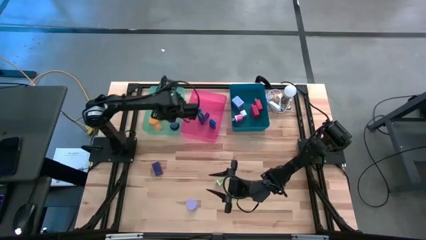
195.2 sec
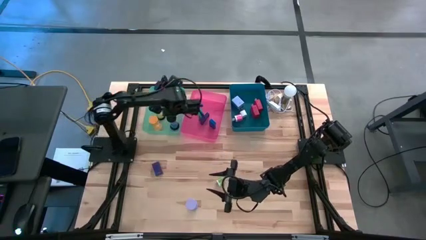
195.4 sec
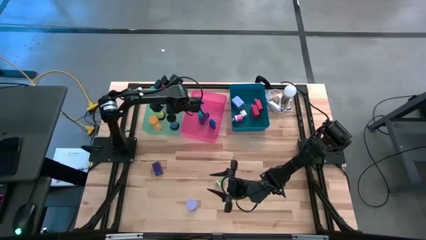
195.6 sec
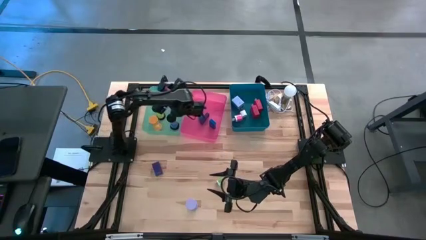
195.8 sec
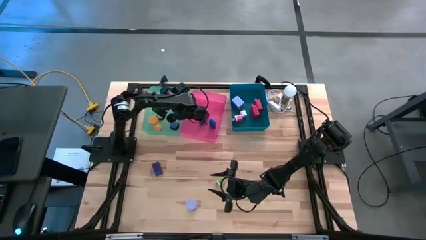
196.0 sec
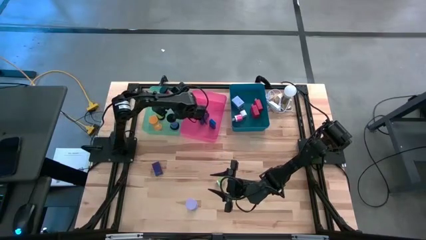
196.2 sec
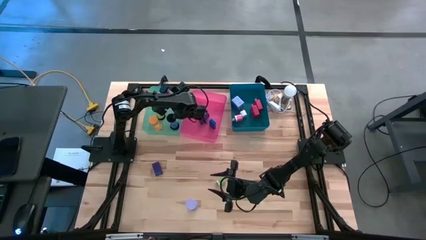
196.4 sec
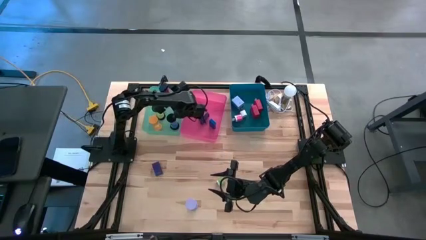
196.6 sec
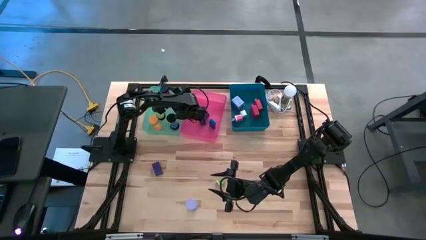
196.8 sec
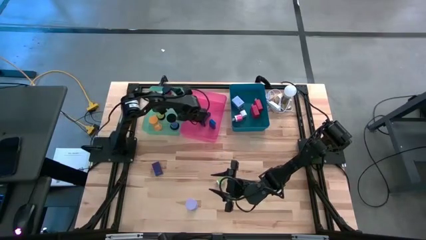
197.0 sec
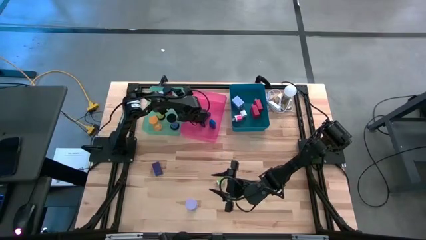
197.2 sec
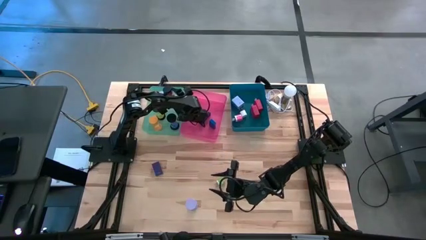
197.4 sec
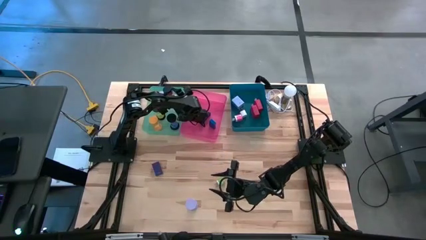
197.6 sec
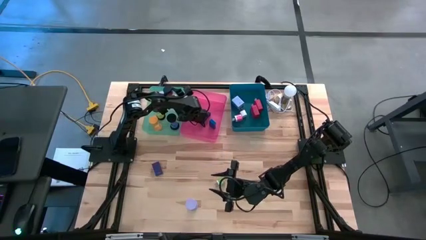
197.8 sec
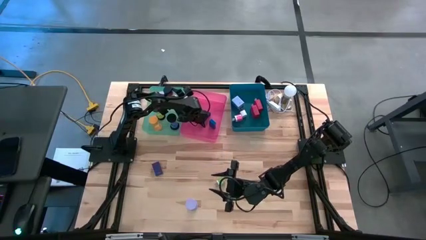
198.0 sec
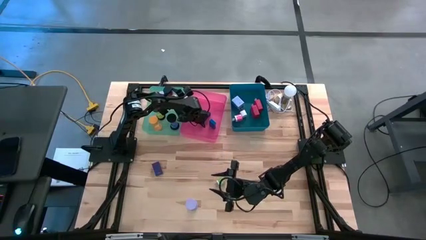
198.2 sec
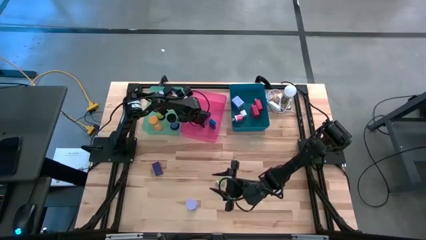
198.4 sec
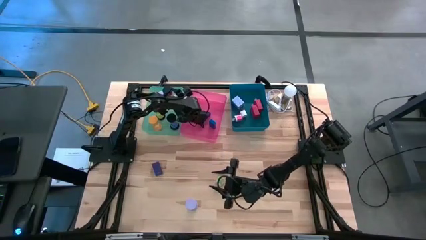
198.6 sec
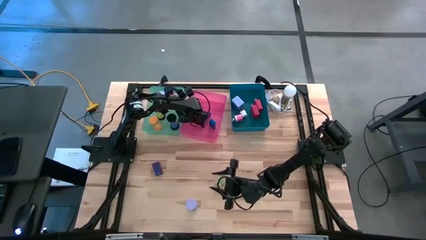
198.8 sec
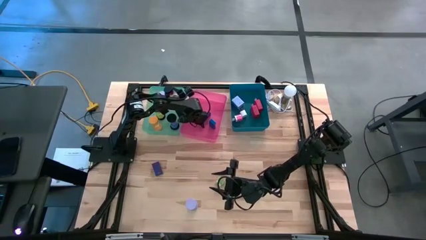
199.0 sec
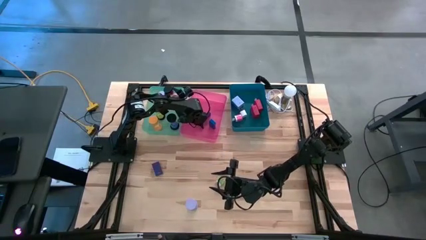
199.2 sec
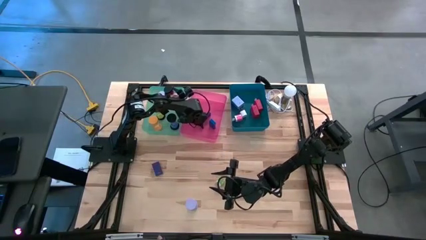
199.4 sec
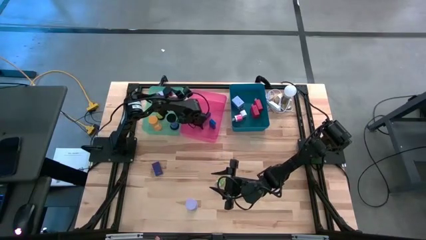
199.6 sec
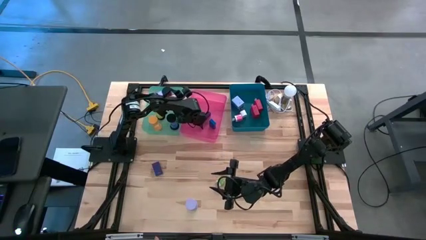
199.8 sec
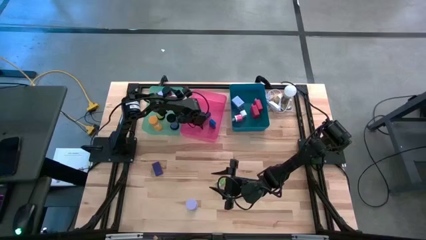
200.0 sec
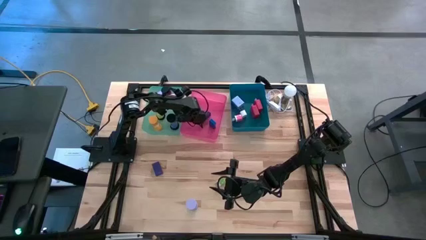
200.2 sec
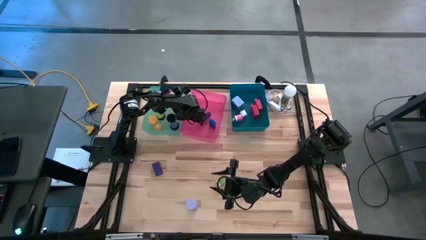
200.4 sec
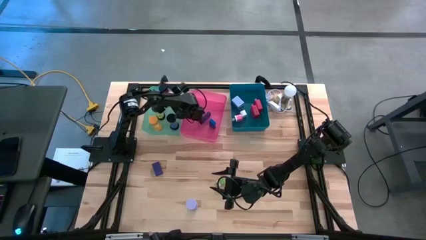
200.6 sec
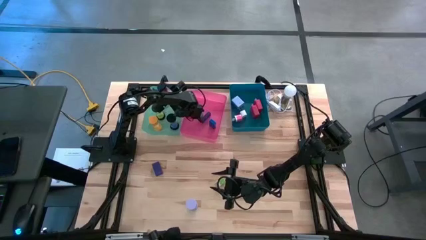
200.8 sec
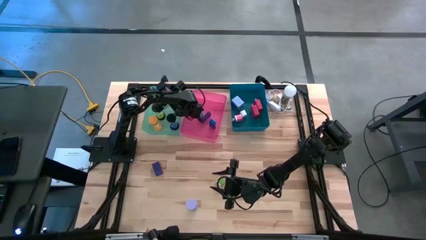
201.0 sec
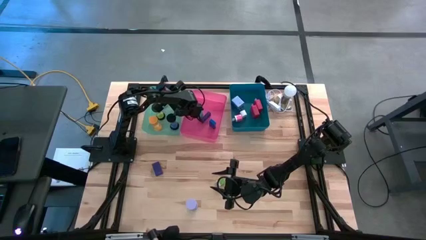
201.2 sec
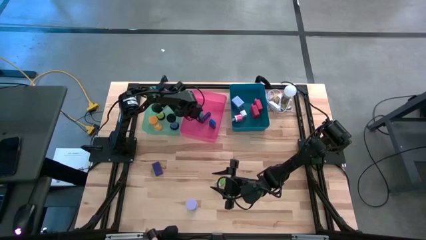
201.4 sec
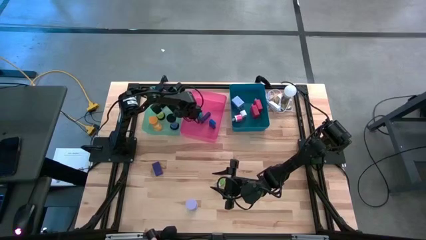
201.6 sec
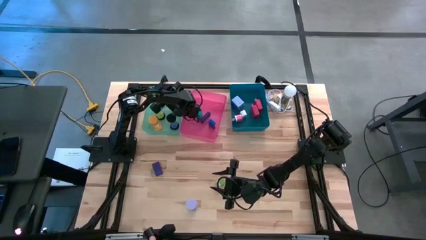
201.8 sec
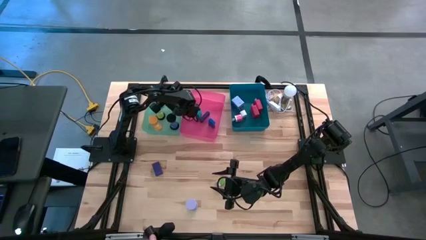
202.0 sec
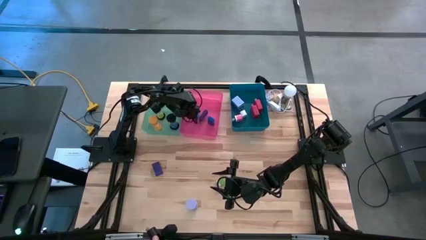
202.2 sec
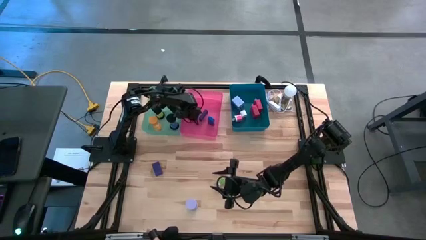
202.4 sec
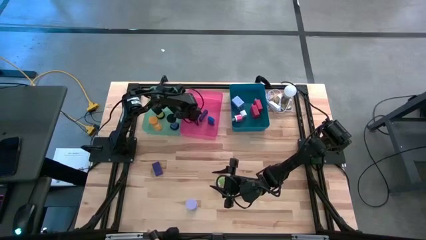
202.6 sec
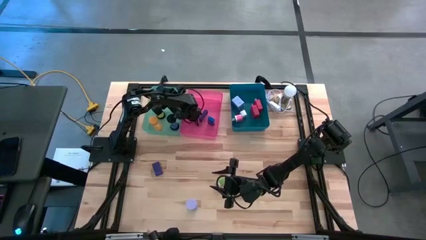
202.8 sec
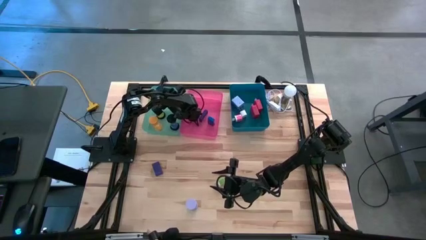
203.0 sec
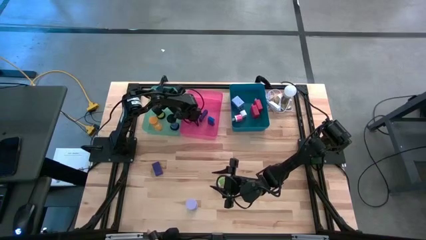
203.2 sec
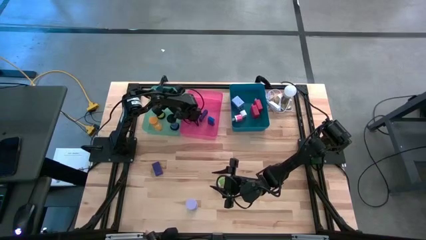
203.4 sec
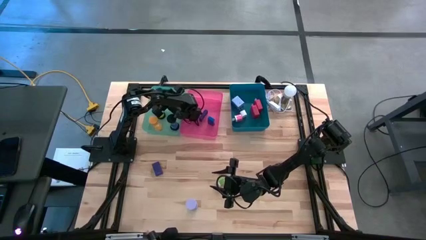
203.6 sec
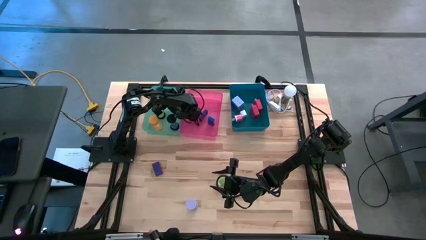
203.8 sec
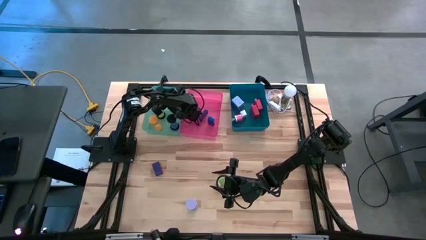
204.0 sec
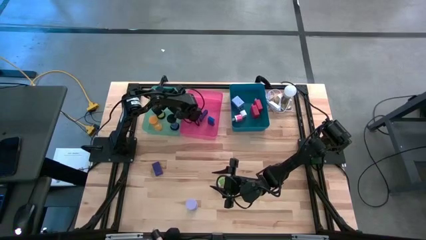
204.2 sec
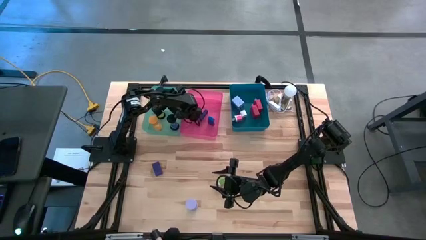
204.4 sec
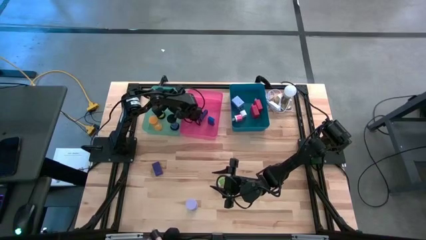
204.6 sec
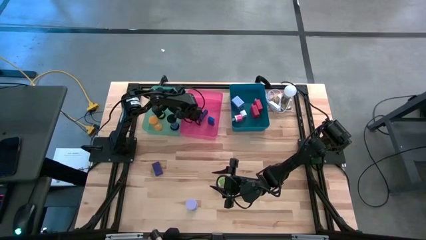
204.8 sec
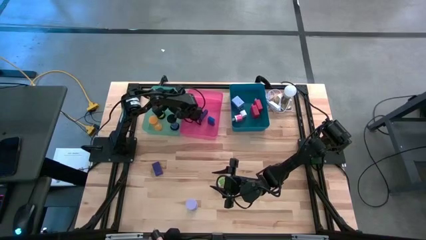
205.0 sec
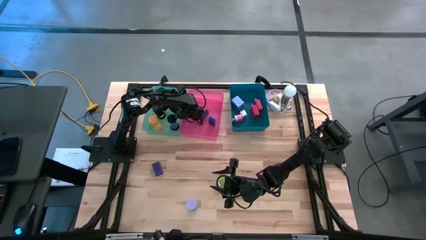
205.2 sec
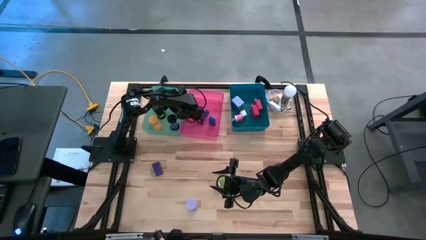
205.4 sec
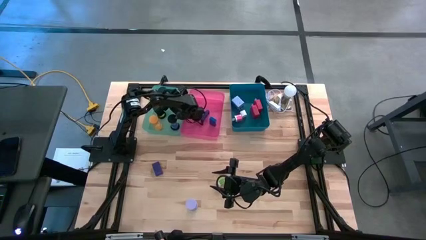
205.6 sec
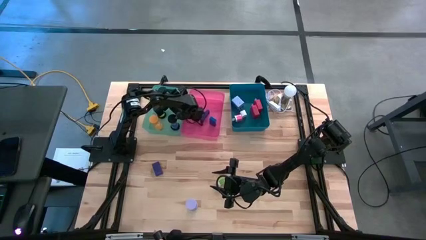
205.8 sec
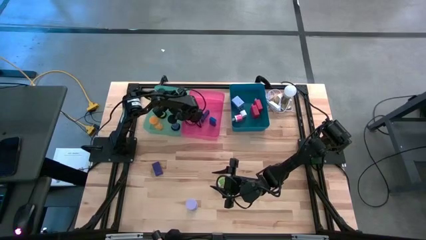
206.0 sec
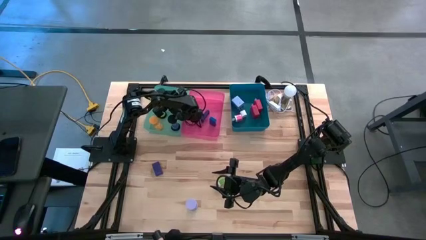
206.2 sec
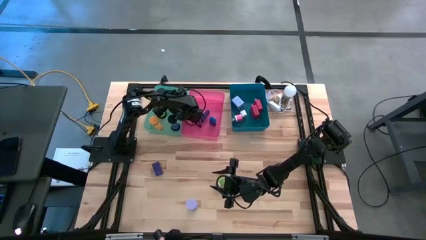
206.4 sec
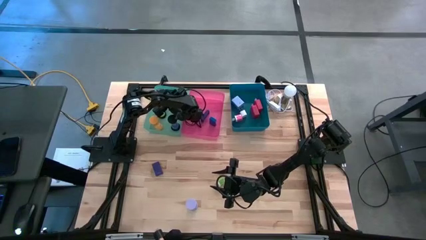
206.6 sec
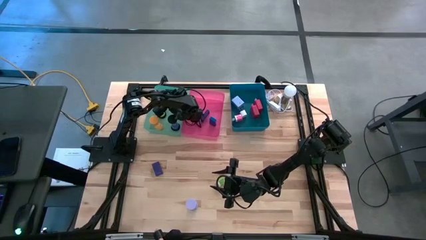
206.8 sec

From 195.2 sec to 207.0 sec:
Task: Pick & Place Office items
Put the red hourglass into the green bin
